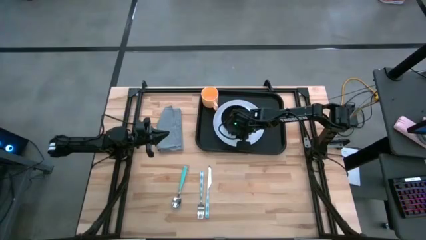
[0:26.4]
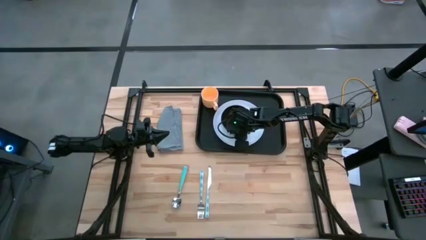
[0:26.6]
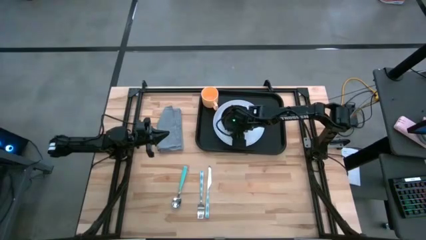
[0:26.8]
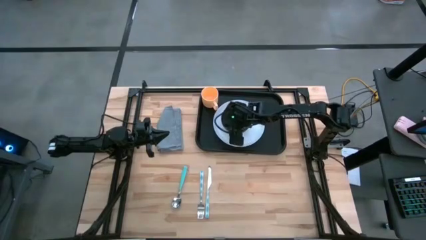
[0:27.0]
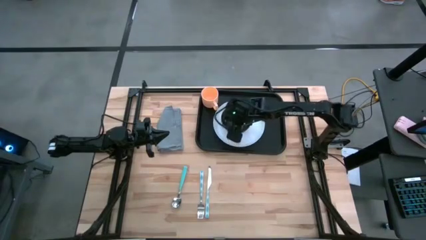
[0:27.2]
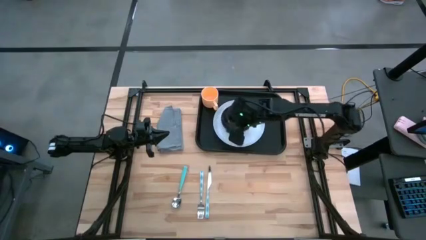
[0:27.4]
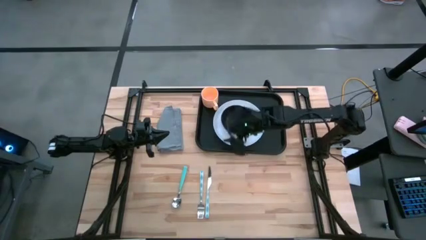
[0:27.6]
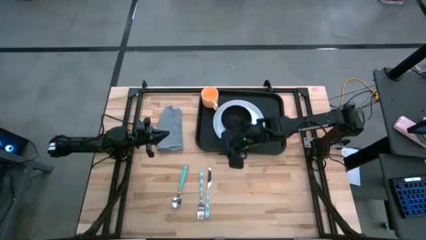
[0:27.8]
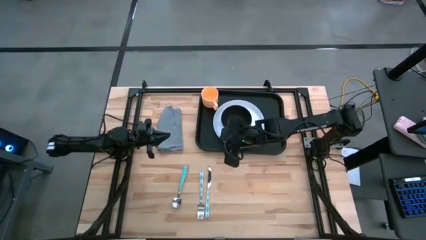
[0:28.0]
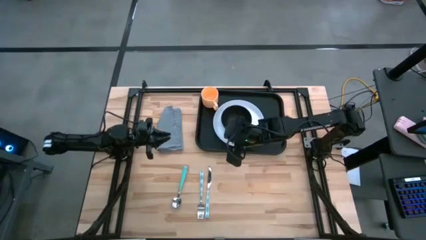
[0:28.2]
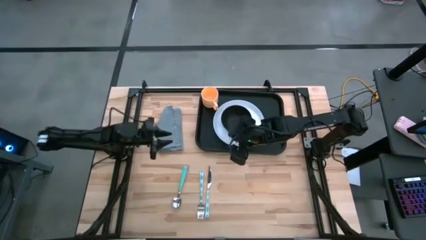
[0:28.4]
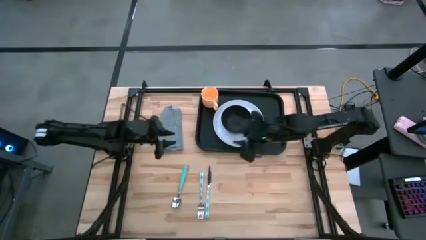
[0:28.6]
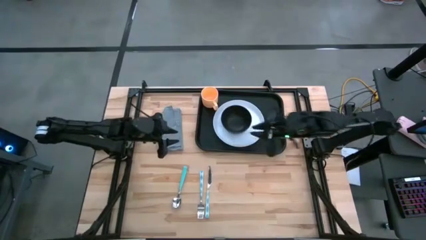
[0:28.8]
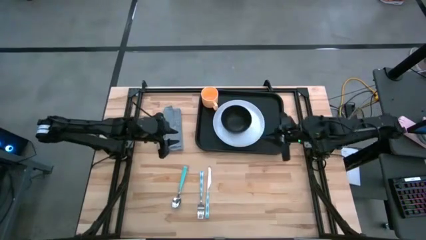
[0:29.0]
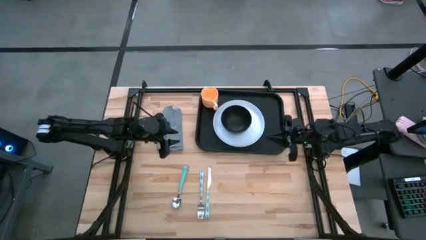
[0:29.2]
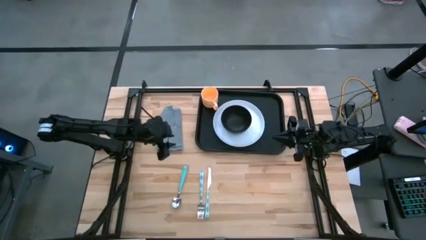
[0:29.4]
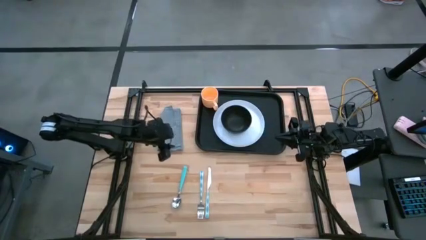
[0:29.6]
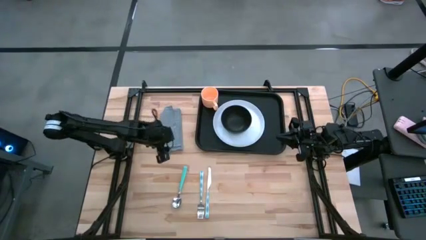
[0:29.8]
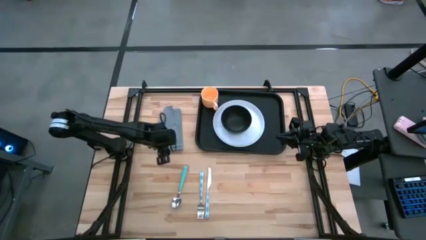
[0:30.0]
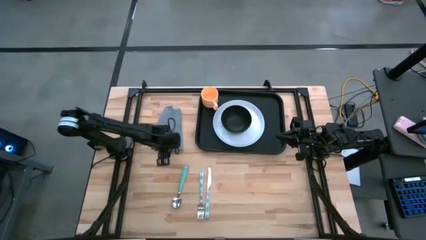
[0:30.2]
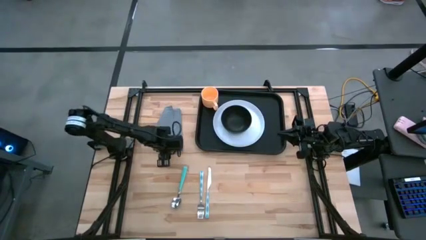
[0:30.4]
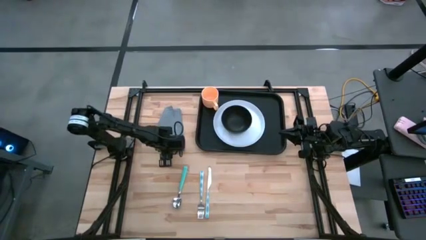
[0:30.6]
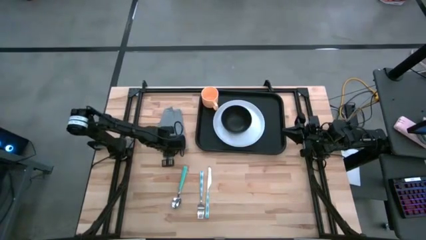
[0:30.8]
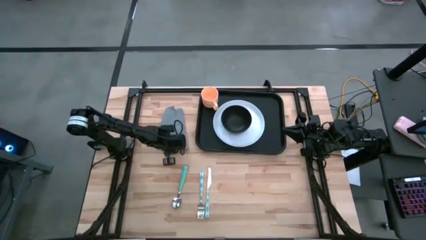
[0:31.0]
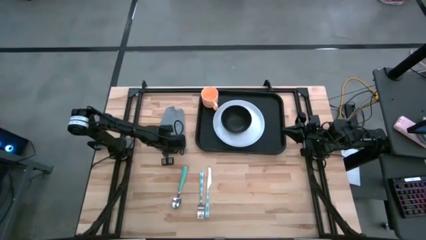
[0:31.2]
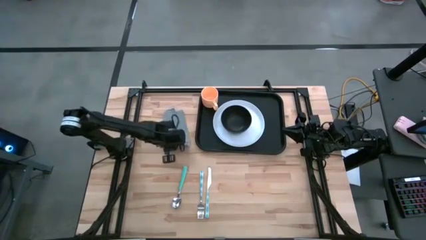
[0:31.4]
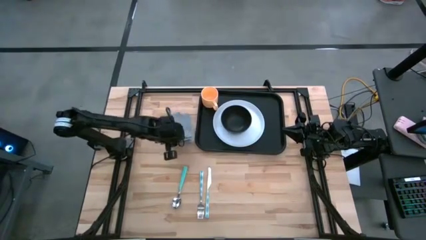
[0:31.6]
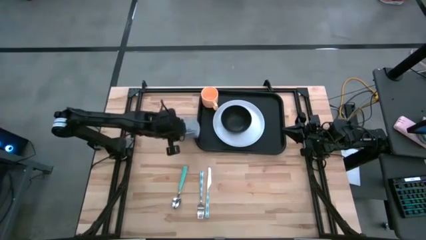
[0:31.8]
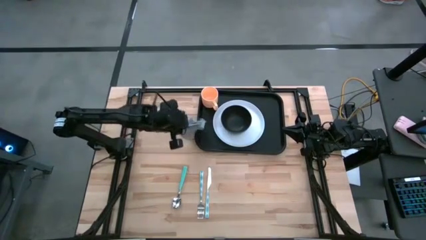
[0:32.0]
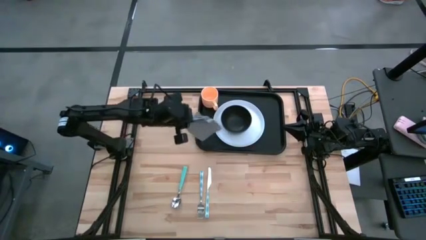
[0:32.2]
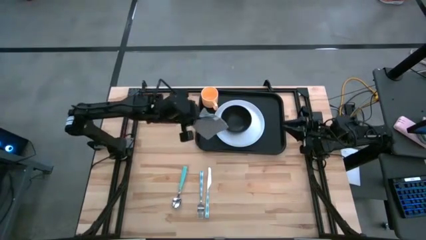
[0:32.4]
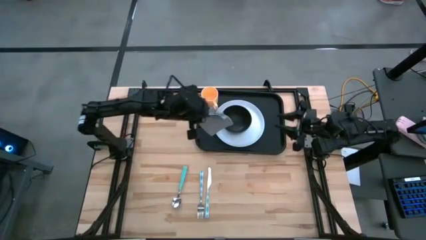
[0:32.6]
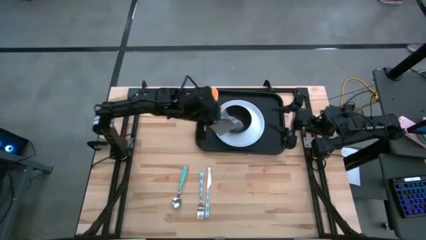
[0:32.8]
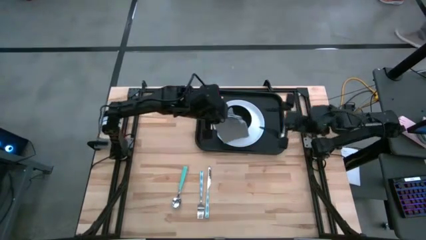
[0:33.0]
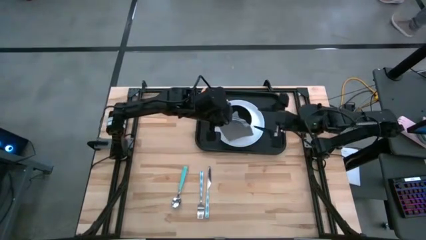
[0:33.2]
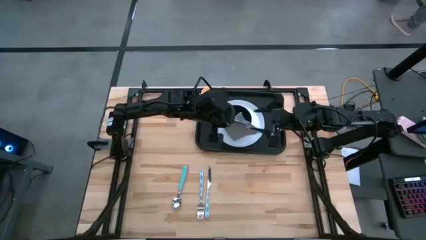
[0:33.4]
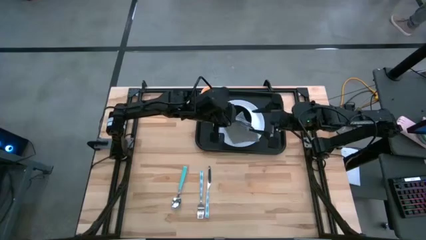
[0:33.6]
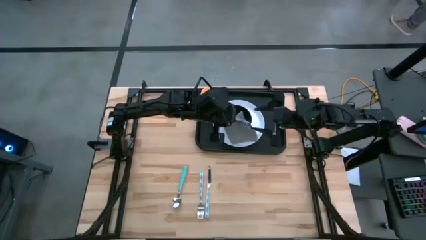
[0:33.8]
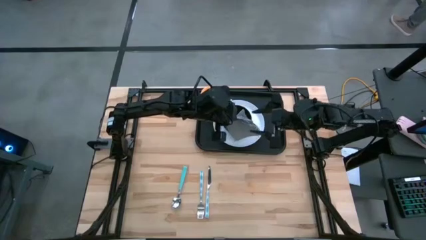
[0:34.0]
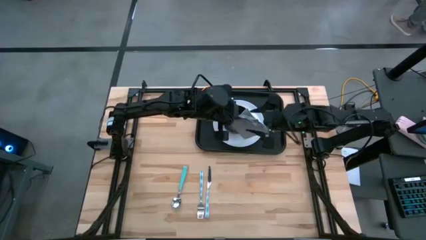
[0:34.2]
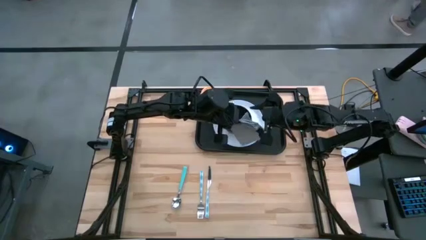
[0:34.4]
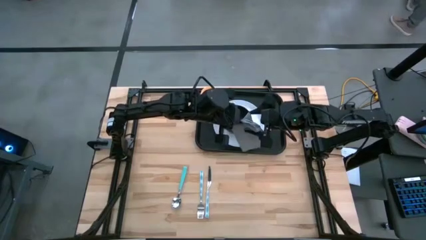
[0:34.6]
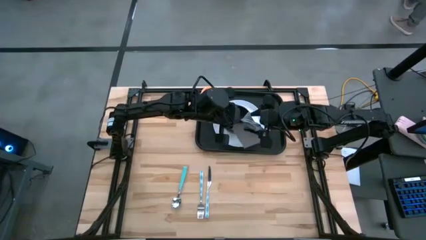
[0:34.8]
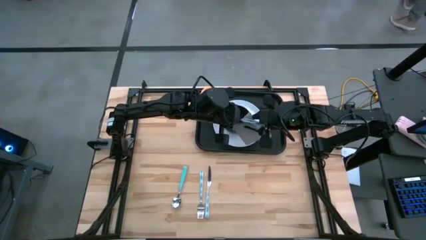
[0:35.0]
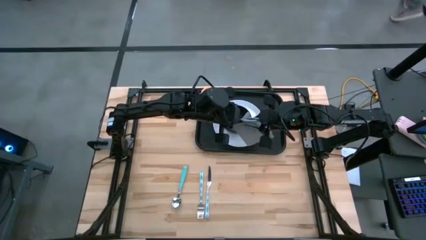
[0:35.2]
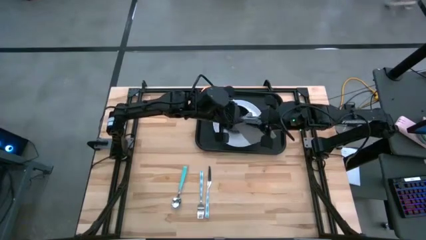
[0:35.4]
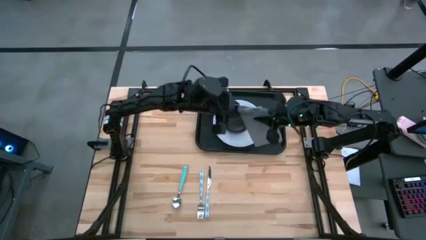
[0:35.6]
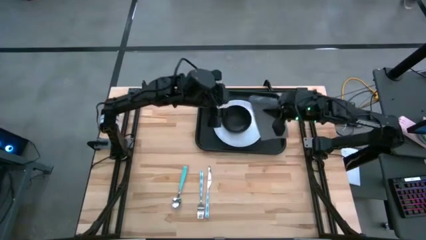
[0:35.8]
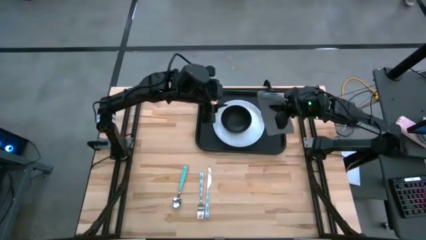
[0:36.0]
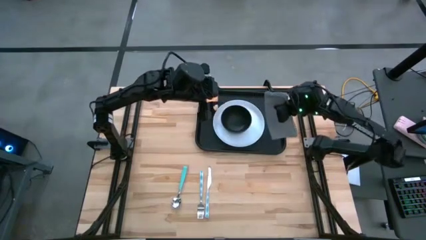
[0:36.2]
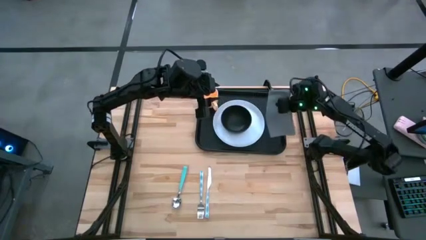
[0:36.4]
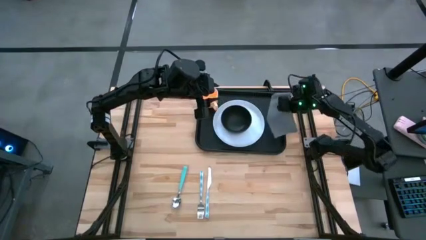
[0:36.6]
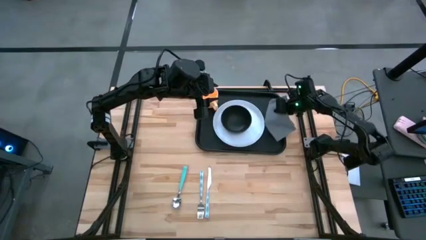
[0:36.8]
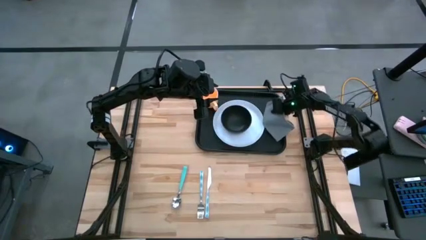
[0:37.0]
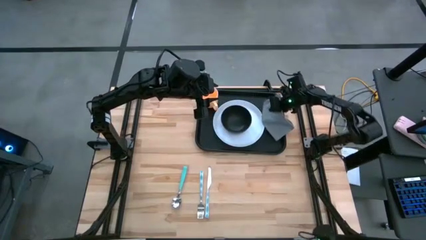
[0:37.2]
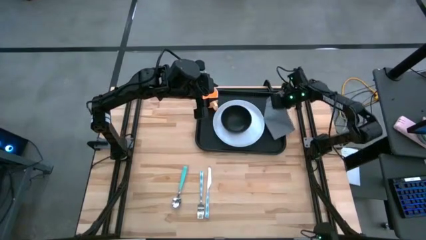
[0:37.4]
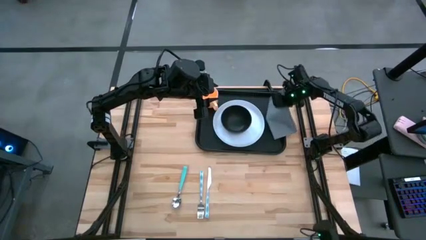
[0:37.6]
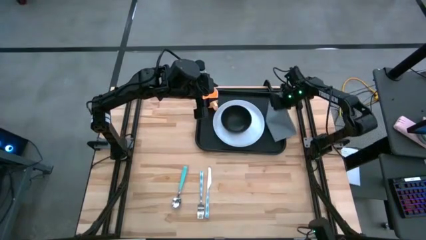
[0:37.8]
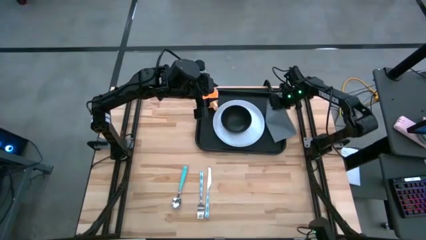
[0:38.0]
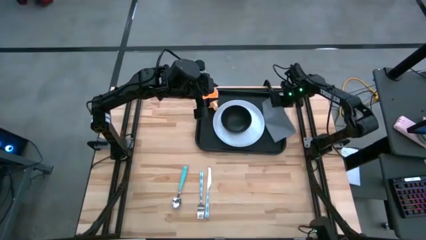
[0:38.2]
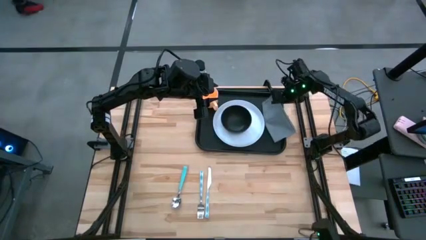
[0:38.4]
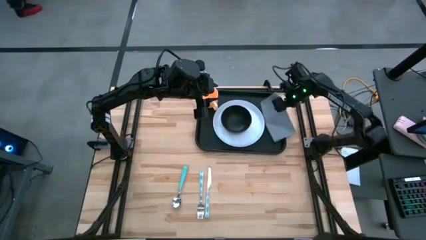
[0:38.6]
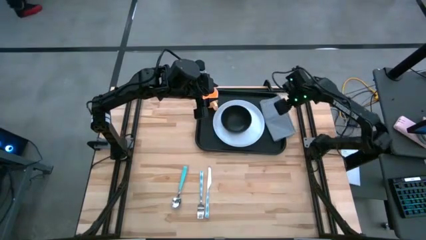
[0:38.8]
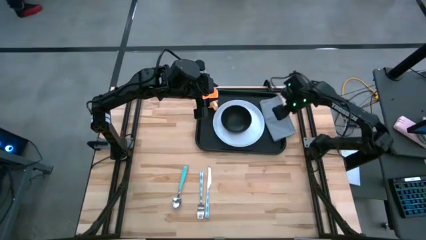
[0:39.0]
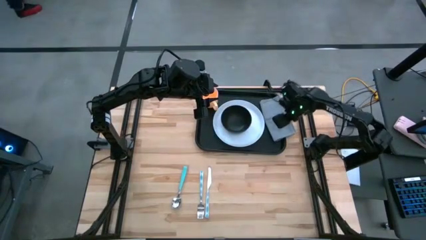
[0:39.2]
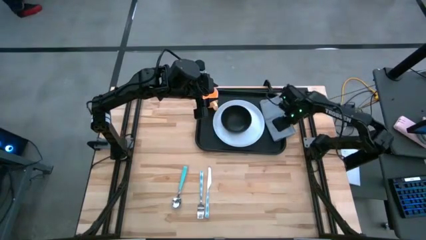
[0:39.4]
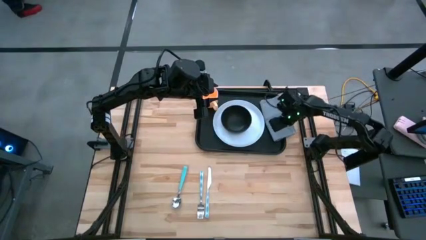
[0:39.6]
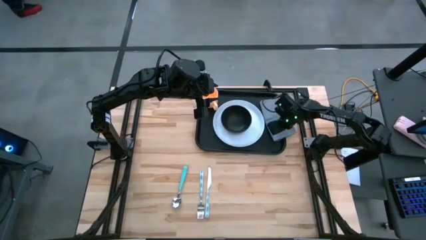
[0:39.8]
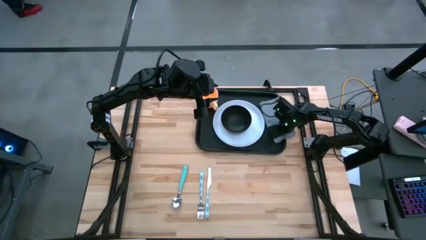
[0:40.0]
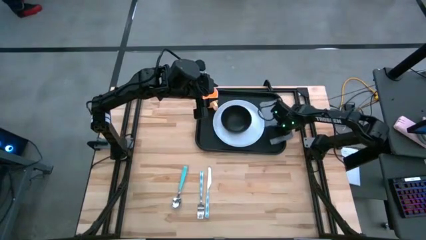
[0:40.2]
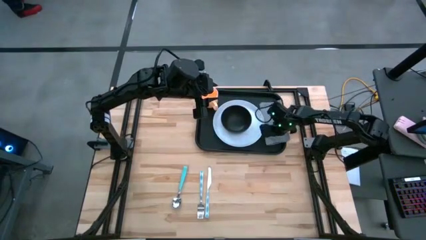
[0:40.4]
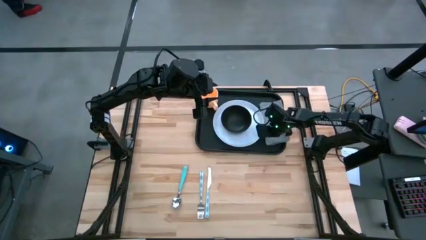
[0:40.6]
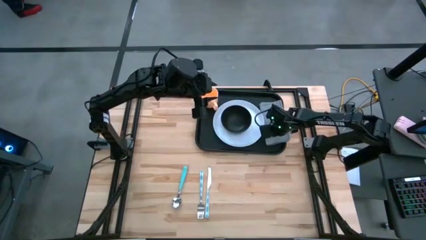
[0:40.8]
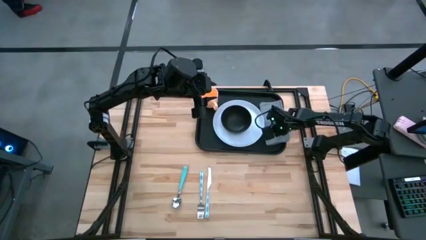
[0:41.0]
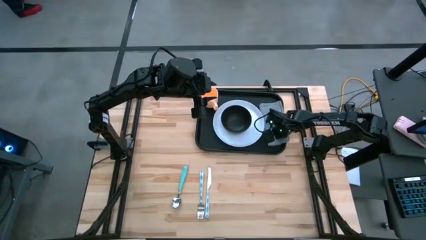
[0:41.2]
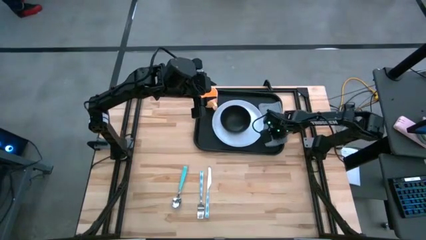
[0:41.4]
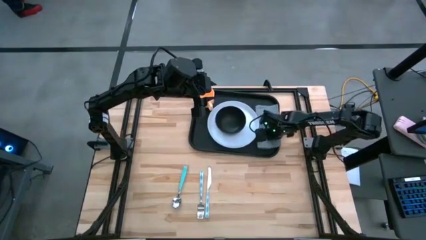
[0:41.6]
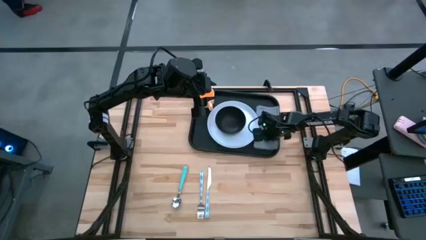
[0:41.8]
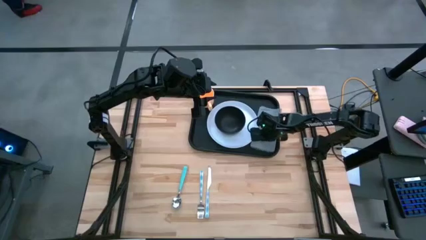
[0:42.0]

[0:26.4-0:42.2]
Task: Set up tray
Put the gray napkin on the black tray to the right of the white plate
